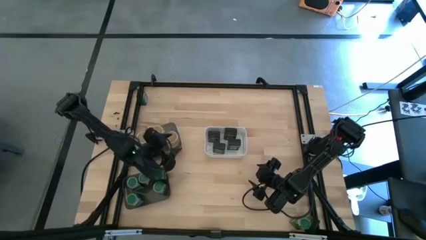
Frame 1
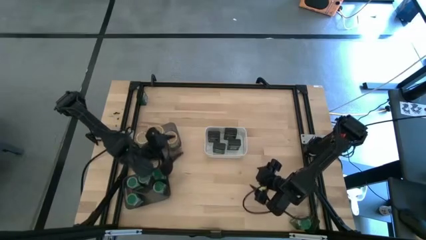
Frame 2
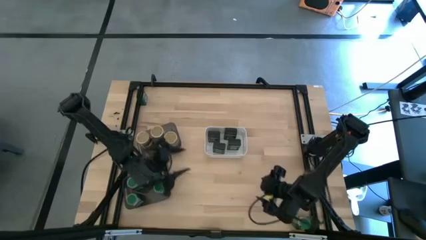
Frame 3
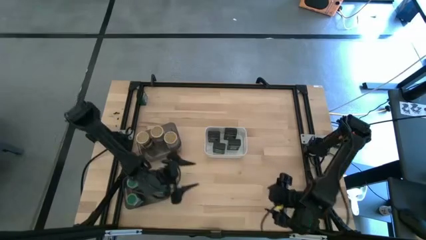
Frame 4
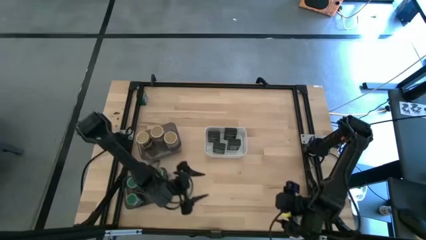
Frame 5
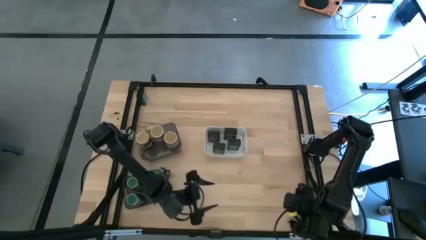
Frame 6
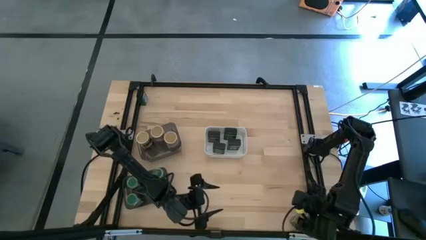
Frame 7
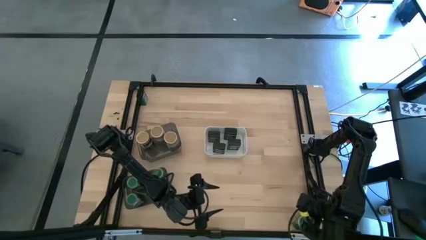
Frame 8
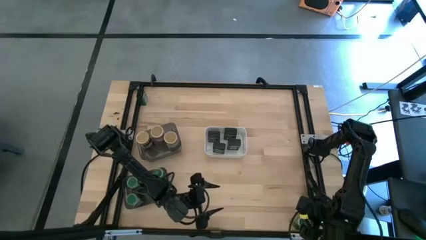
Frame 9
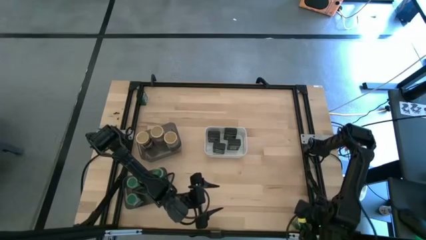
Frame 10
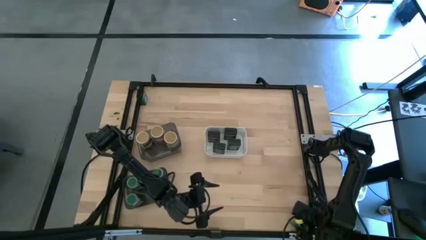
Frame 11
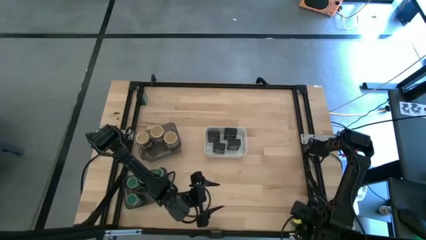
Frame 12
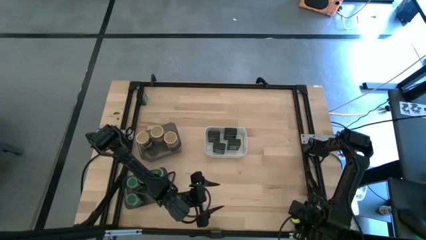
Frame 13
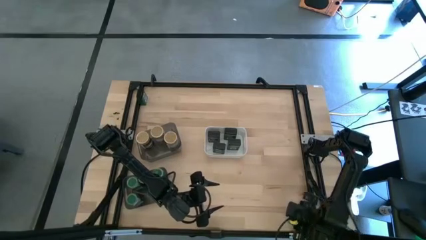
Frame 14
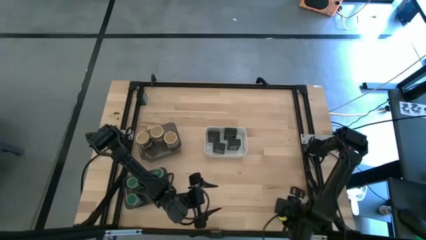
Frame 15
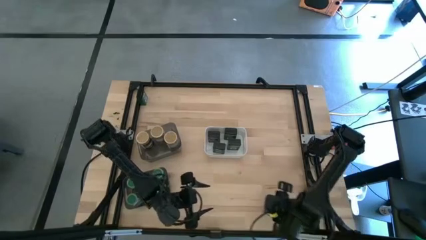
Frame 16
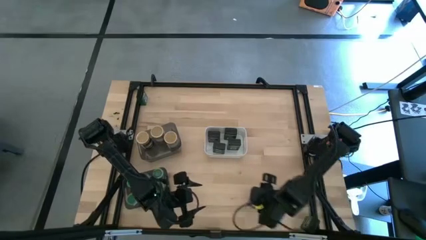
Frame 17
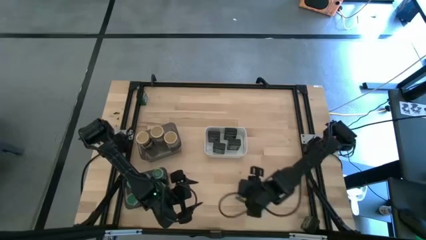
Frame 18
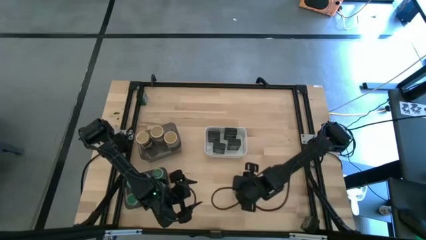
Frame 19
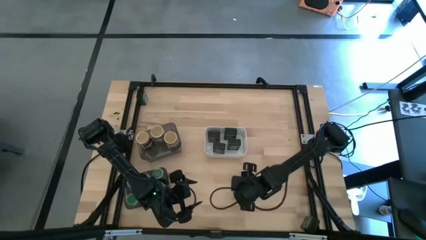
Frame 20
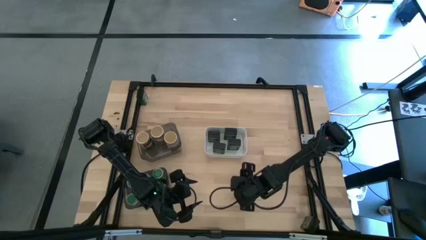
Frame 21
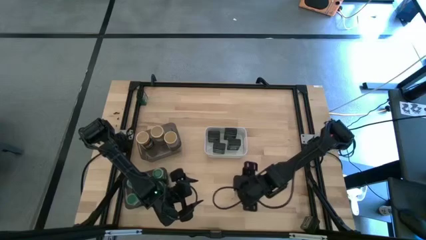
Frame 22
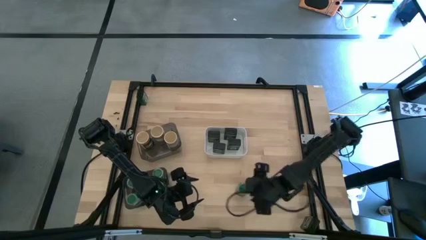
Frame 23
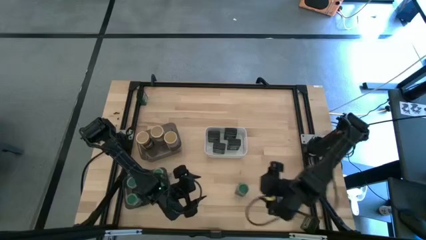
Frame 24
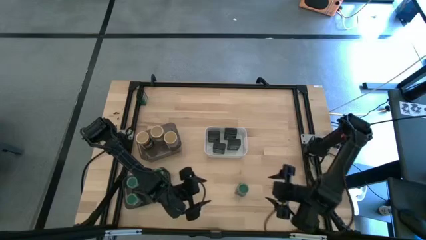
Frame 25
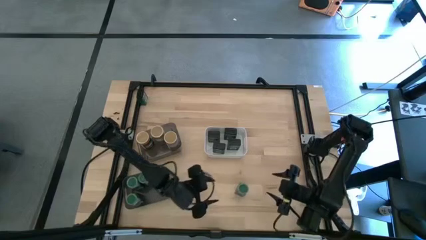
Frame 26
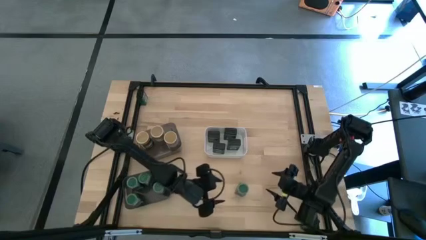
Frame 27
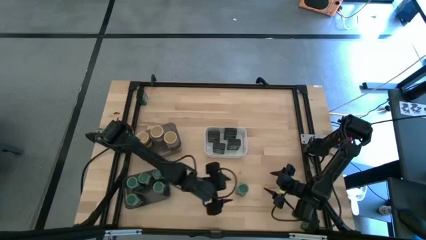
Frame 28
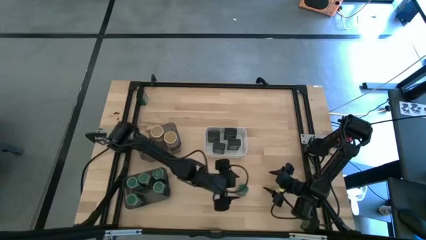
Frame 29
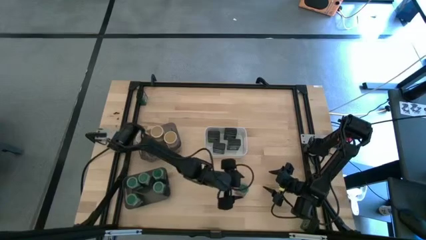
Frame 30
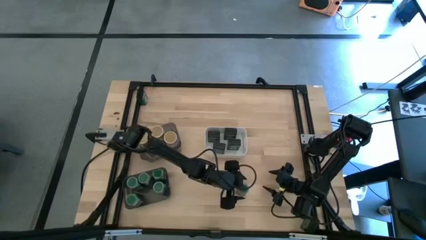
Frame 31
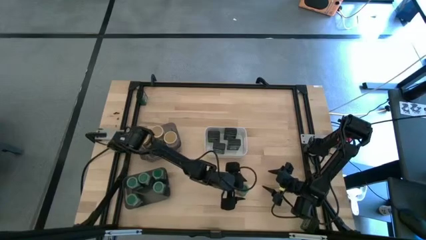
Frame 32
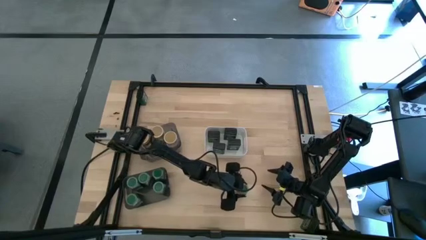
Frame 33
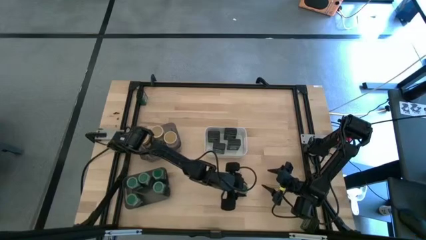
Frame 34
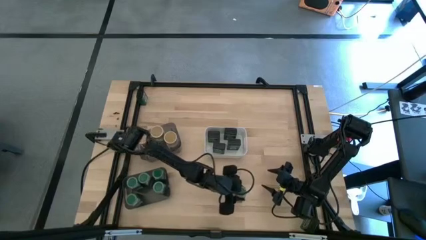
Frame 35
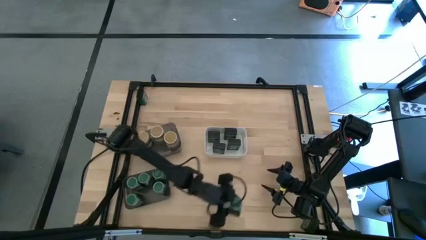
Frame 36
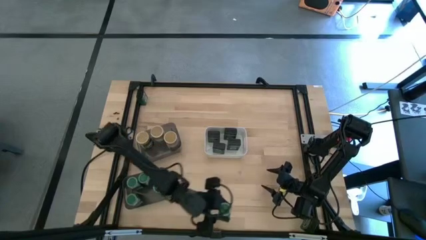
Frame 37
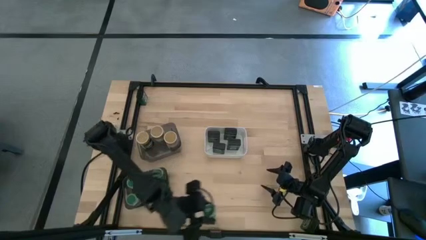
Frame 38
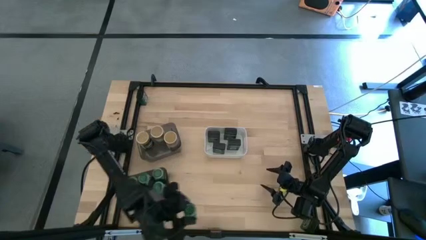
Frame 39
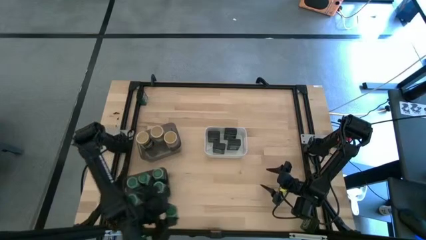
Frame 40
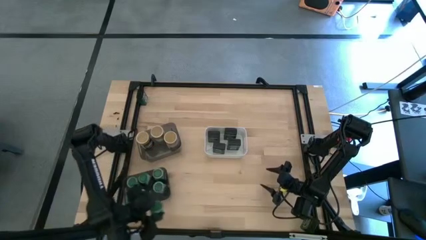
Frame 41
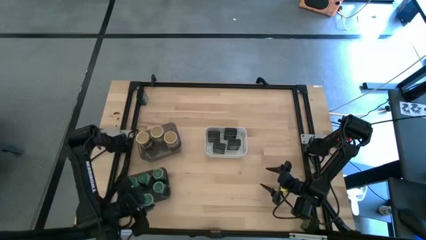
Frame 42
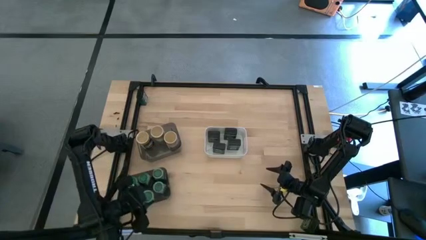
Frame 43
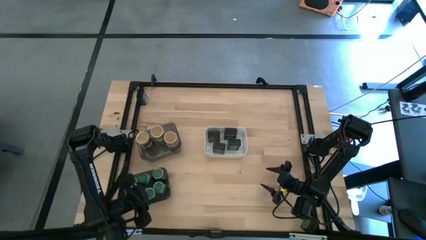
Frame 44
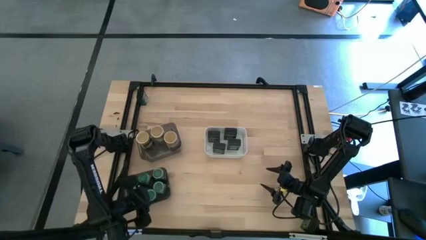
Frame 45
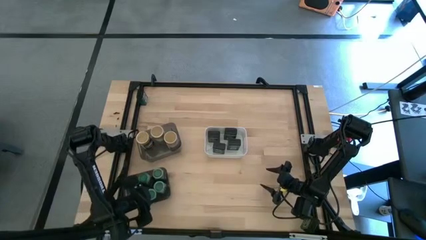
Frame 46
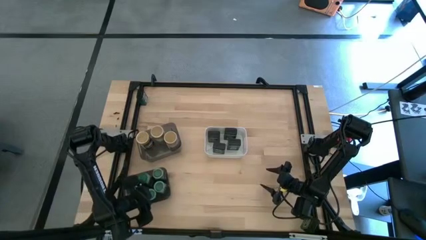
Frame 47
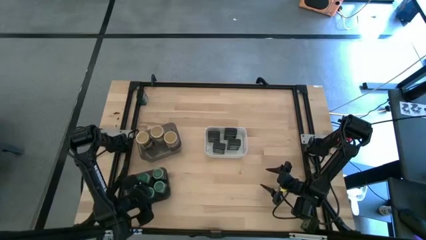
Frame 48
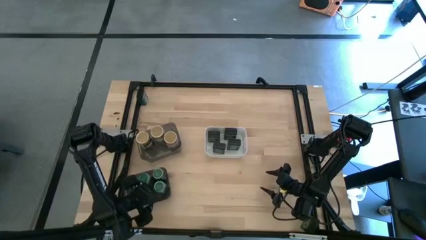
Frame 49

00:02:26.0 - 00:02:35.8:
Task: Sort spices by type
Put the green seasoning bottle into the bottom black bin

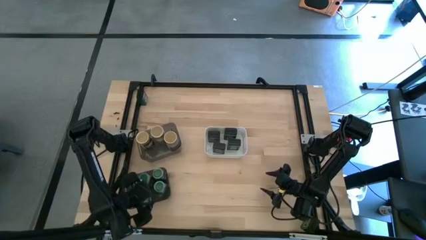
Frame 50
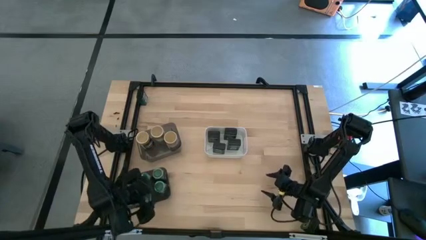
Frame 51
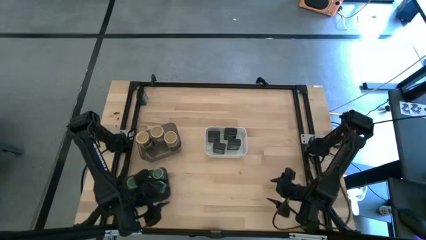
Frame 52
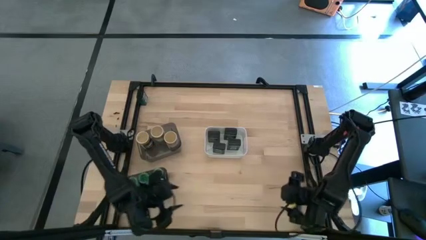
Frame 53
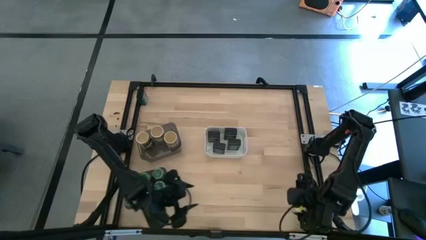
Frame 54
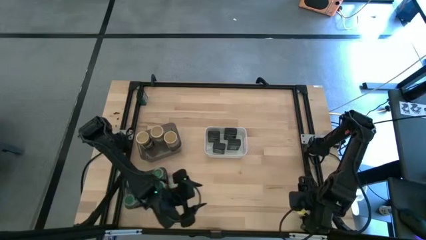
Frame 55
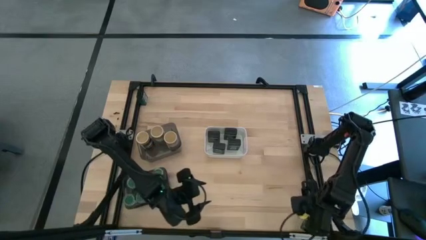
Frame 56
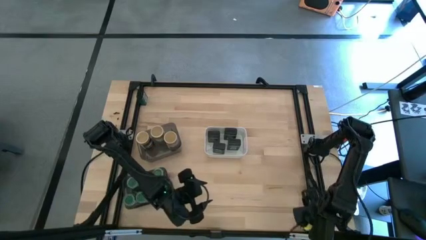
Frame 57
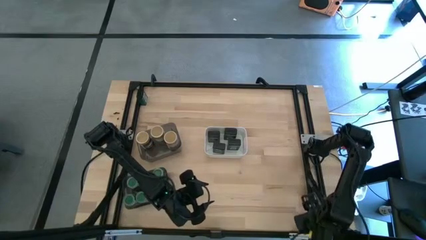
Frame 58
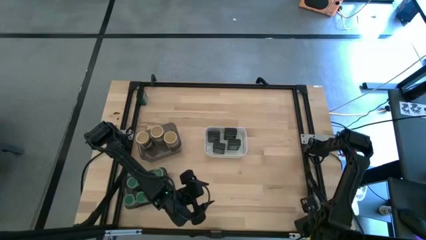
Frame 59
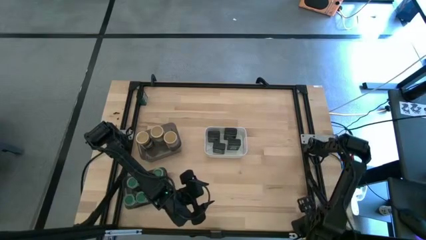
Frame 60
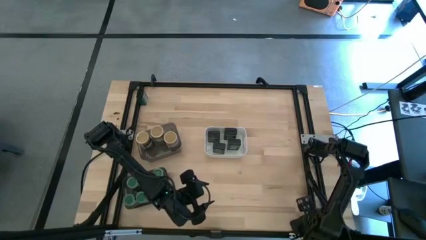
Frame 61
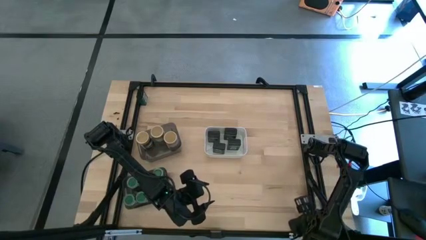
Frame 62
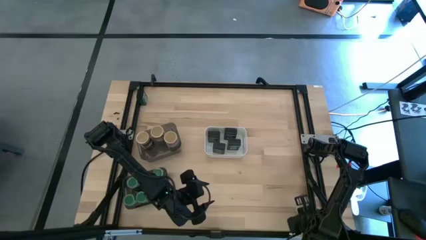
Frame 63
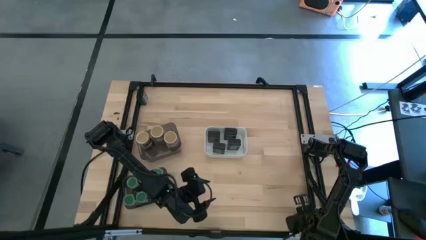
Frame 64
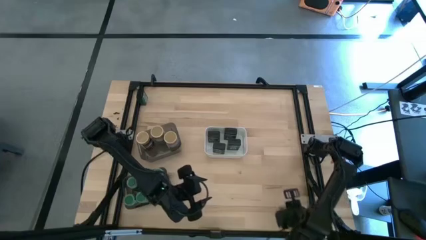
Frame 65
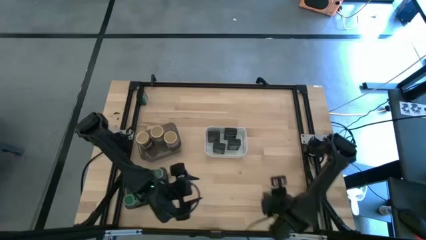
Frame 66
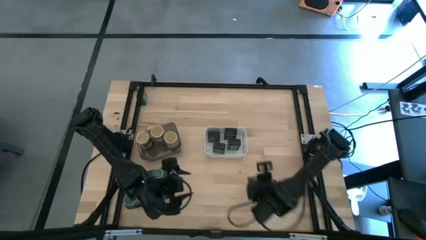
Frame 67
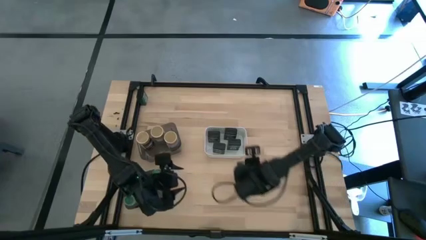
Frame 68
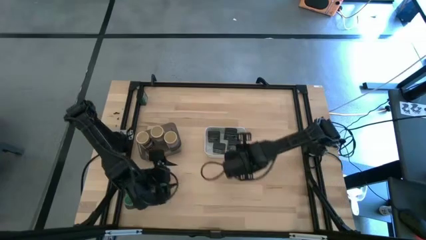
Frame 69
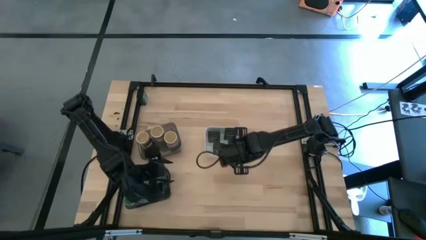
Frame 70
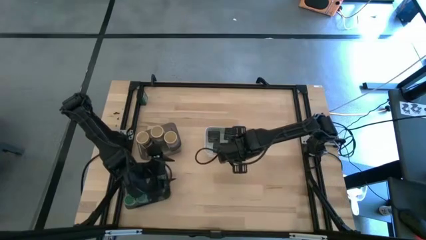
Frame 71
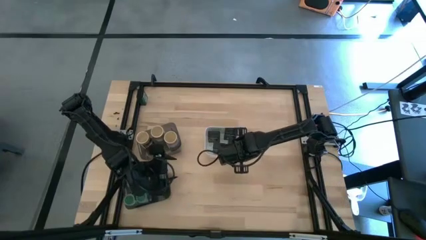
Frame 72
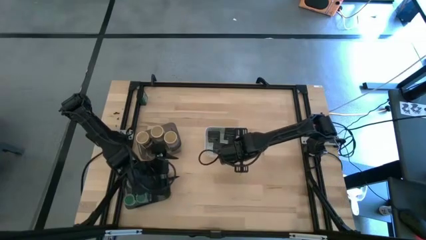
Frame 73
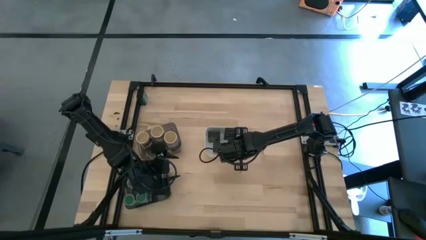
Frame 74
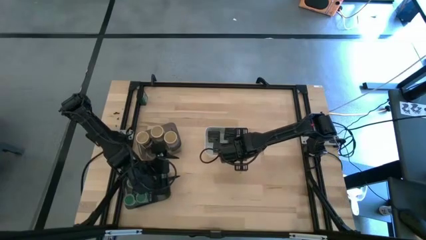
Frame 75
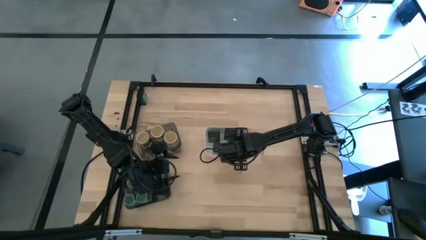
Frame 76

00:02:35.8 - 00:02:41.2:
Put the black seasoning can into the white bin

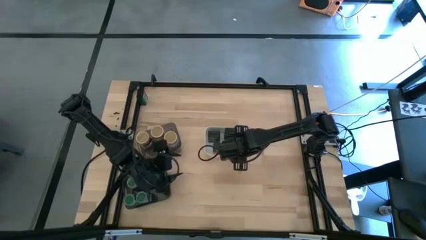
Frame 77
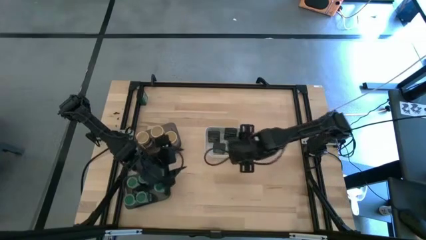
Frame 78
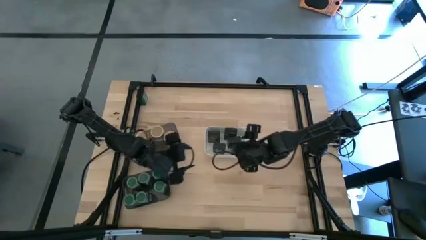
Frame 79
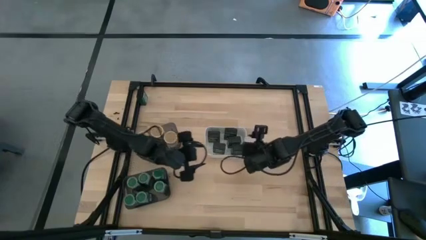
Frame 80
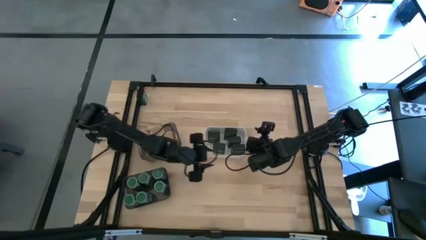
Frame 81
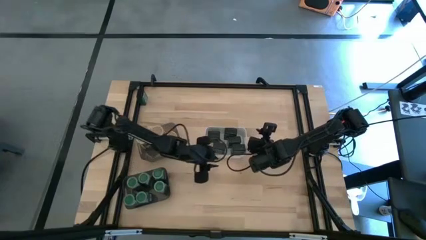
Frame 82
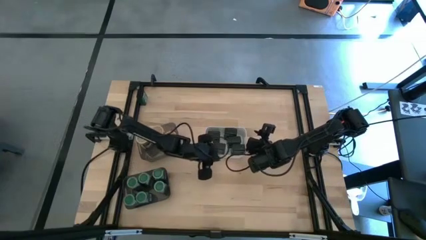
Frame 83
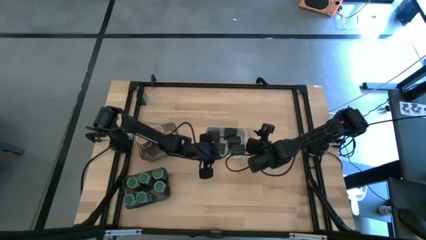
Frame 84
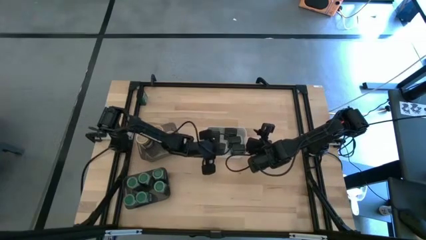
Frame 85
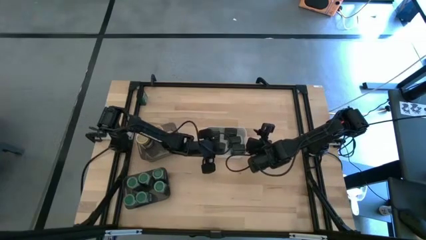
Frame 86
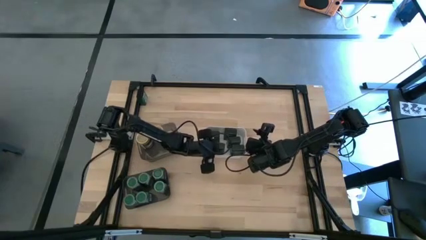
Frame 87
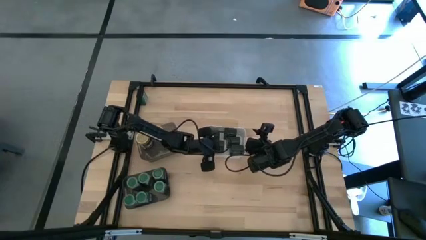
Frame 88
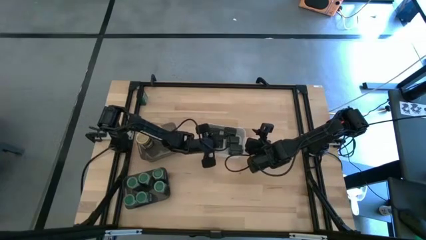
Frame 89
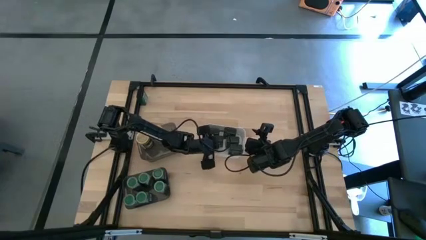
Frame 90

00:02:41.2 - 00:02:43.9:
Adjust the black seasoning can in the white bin
